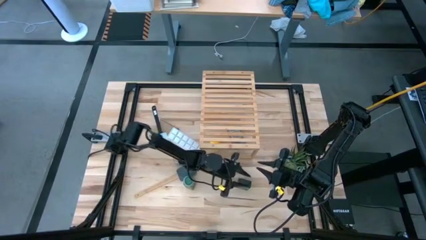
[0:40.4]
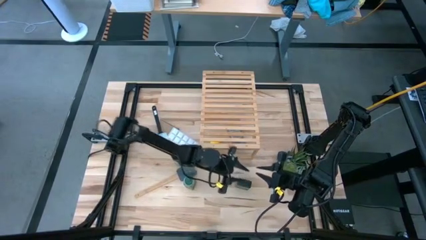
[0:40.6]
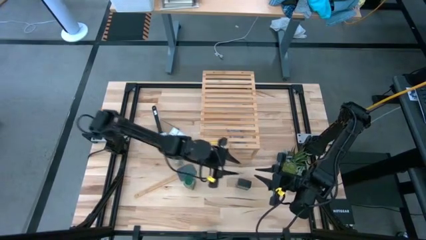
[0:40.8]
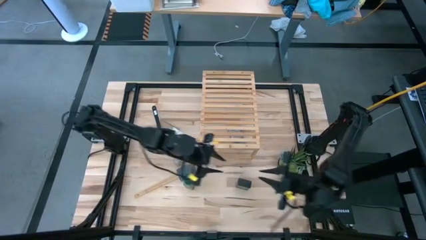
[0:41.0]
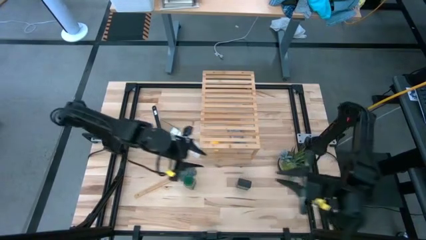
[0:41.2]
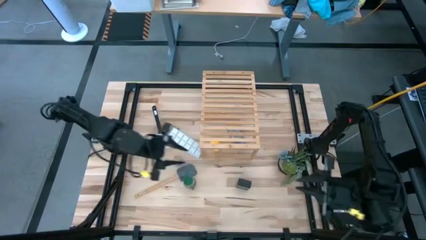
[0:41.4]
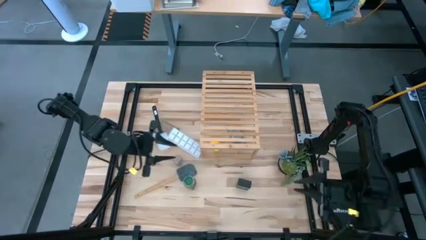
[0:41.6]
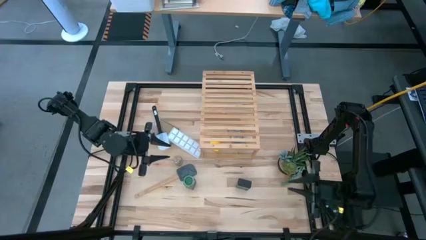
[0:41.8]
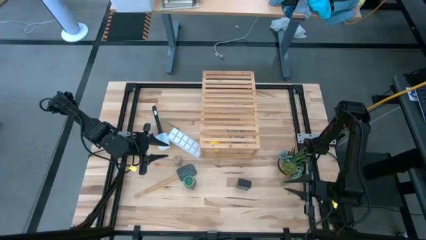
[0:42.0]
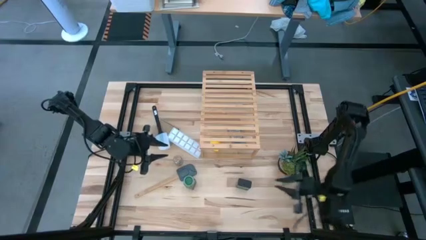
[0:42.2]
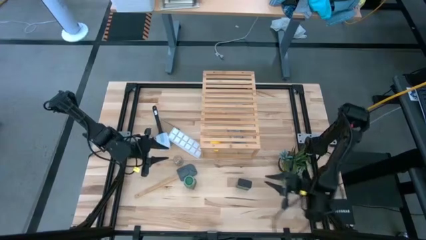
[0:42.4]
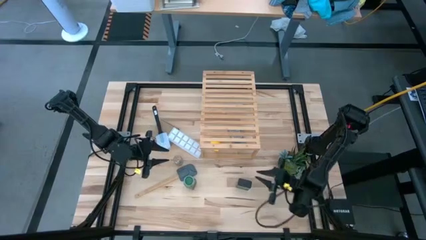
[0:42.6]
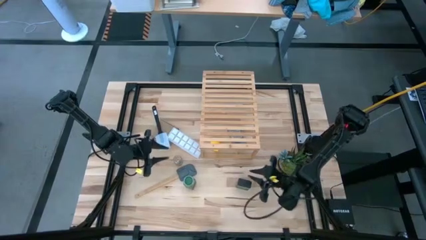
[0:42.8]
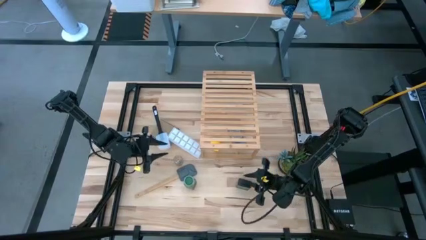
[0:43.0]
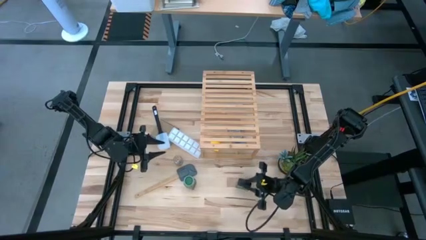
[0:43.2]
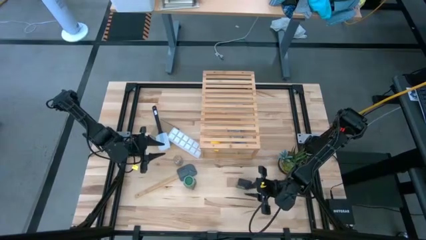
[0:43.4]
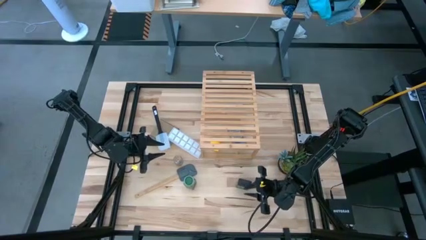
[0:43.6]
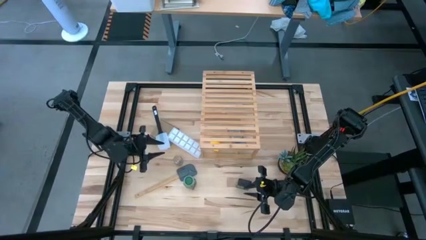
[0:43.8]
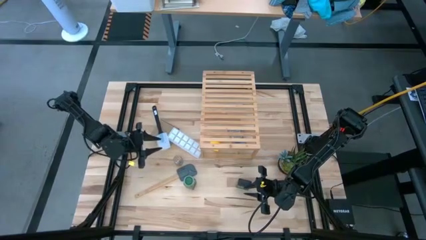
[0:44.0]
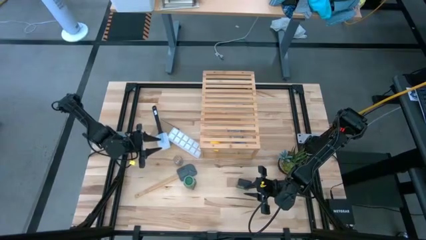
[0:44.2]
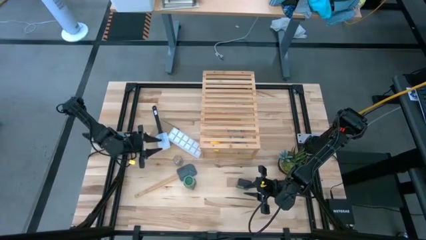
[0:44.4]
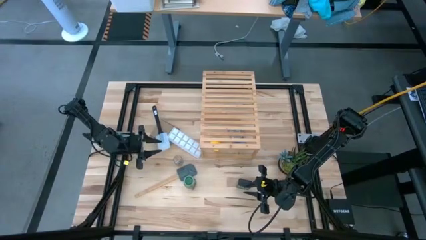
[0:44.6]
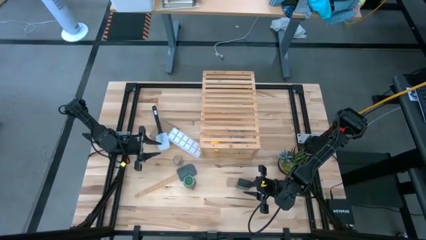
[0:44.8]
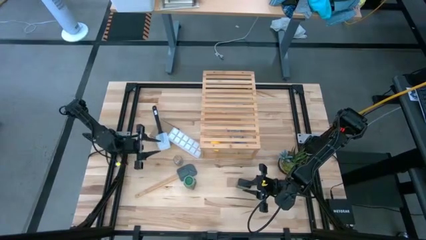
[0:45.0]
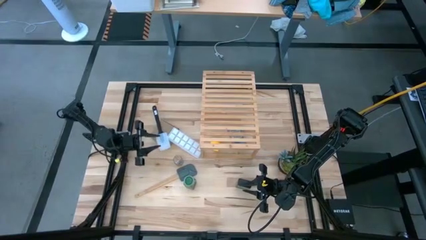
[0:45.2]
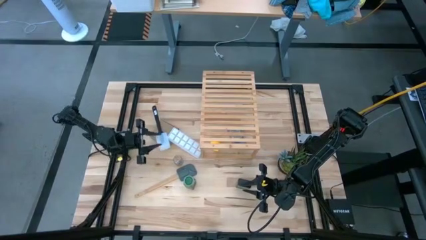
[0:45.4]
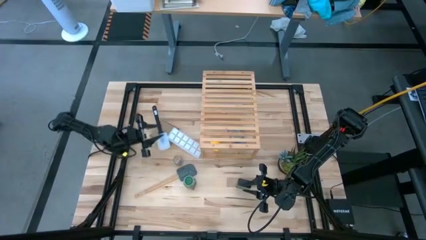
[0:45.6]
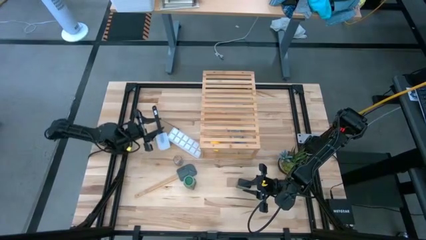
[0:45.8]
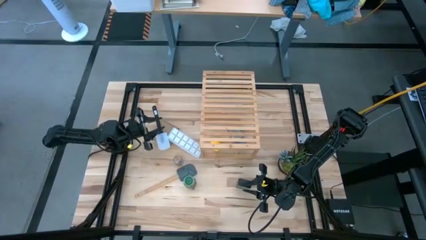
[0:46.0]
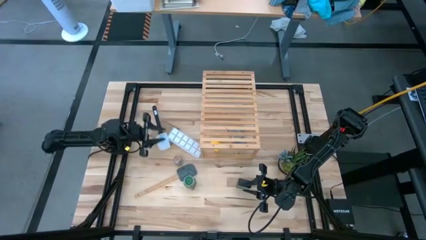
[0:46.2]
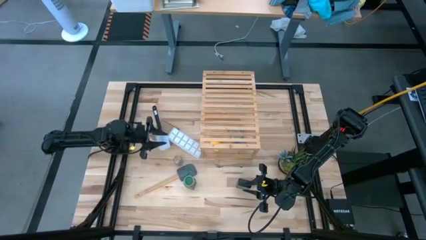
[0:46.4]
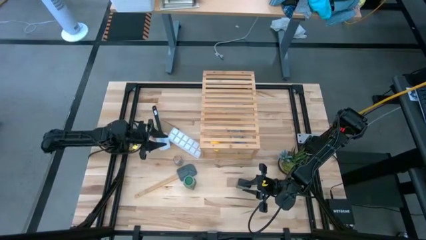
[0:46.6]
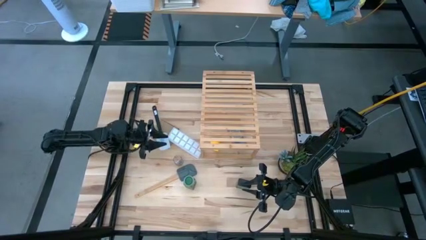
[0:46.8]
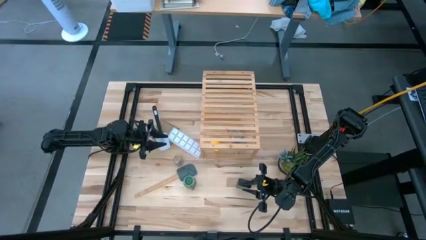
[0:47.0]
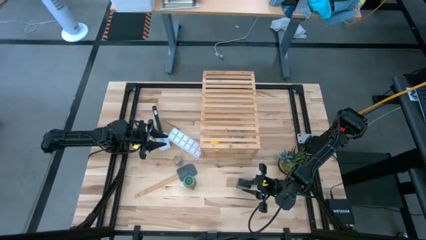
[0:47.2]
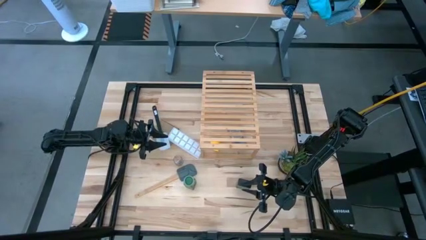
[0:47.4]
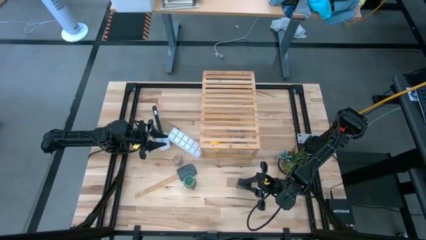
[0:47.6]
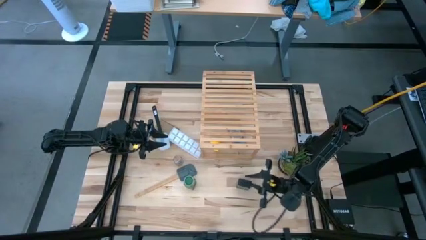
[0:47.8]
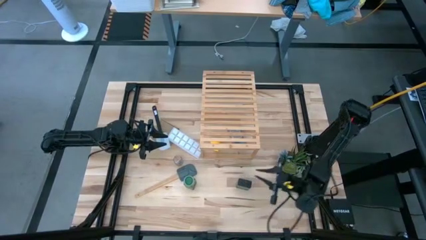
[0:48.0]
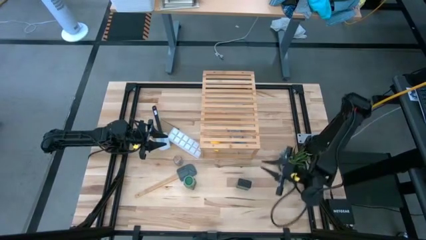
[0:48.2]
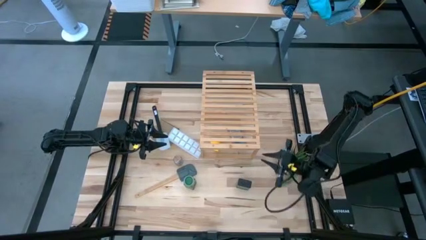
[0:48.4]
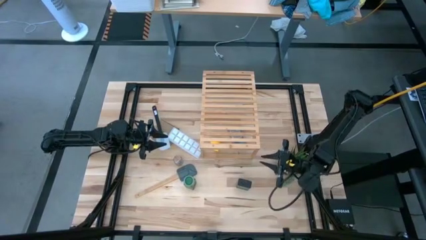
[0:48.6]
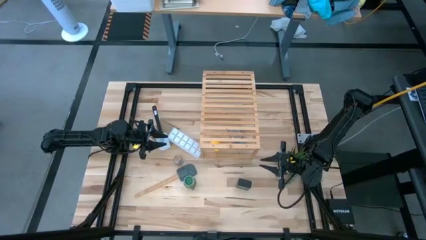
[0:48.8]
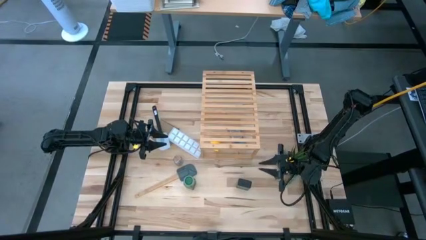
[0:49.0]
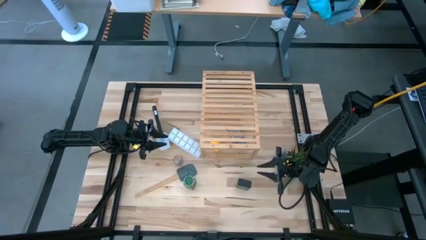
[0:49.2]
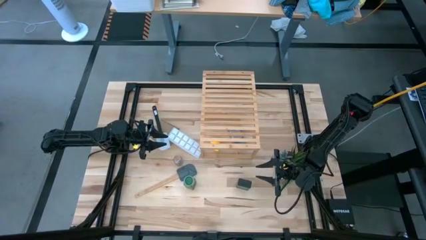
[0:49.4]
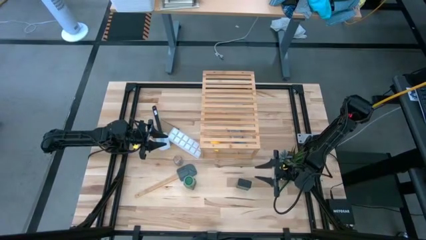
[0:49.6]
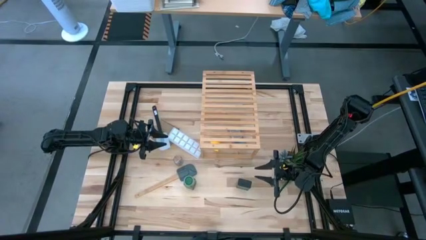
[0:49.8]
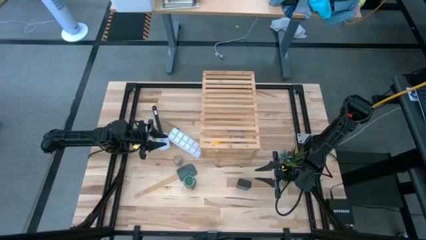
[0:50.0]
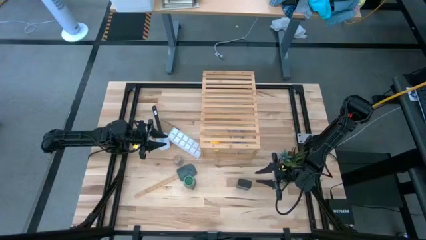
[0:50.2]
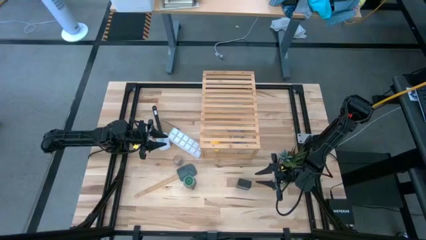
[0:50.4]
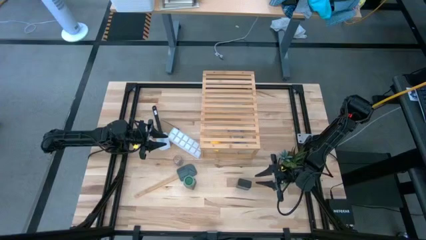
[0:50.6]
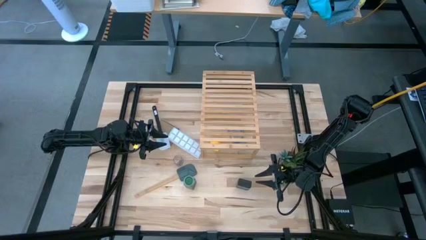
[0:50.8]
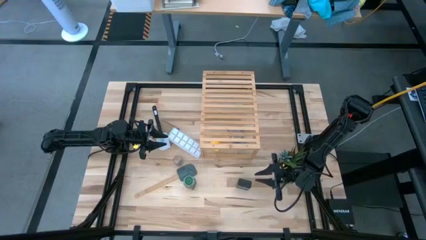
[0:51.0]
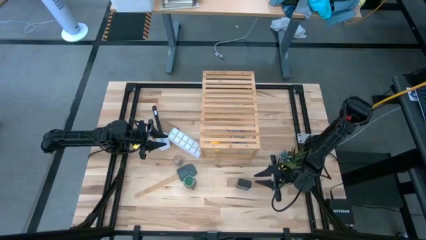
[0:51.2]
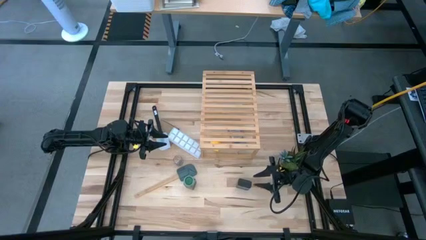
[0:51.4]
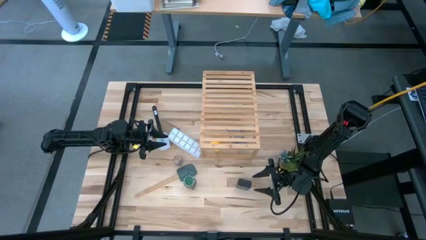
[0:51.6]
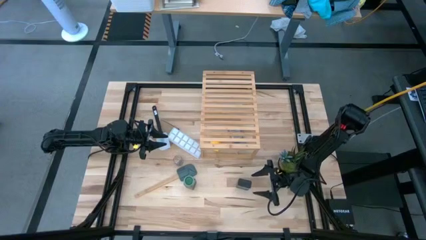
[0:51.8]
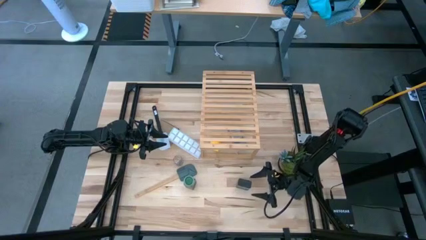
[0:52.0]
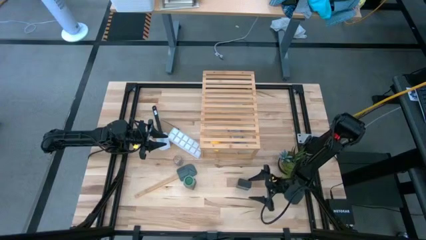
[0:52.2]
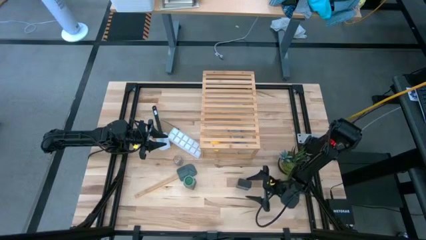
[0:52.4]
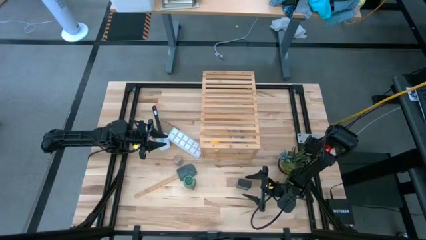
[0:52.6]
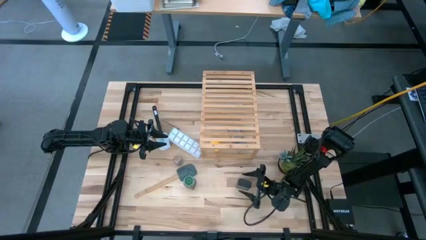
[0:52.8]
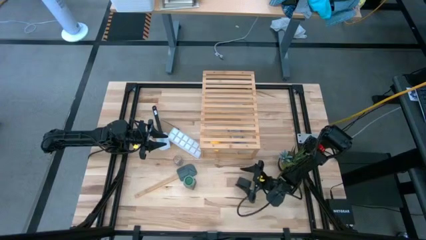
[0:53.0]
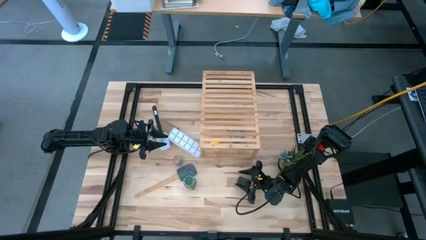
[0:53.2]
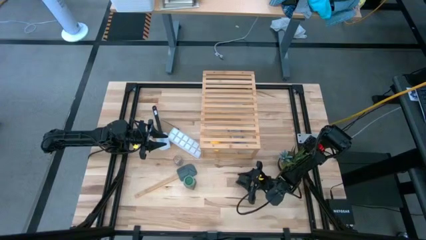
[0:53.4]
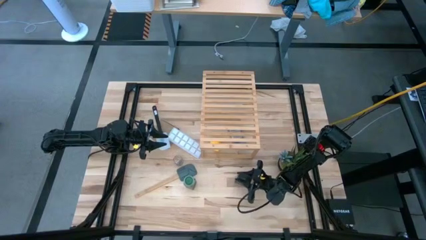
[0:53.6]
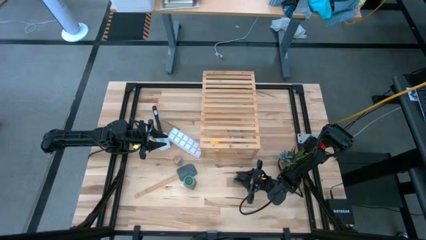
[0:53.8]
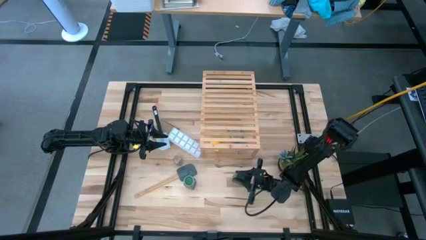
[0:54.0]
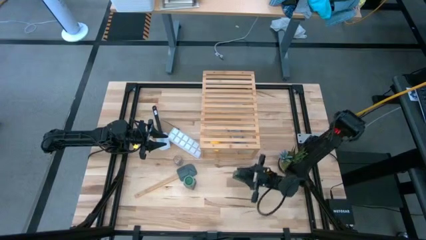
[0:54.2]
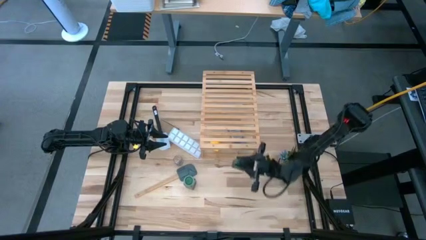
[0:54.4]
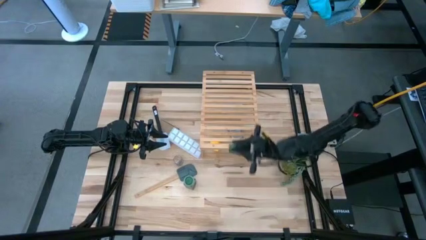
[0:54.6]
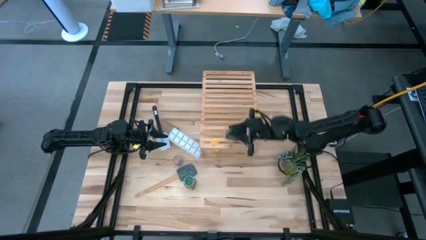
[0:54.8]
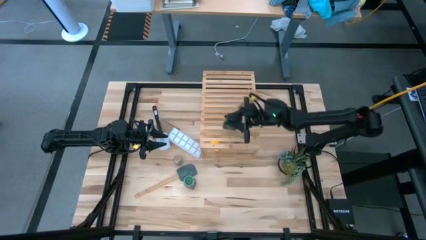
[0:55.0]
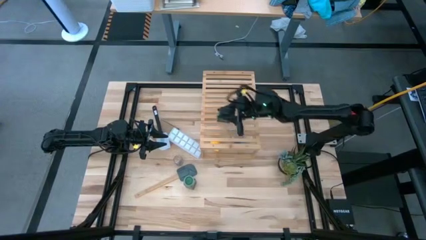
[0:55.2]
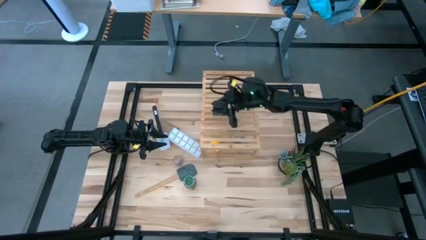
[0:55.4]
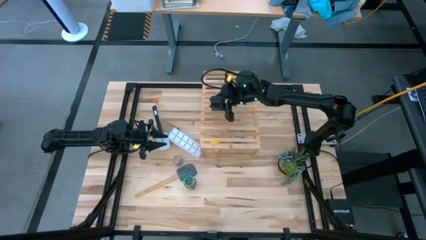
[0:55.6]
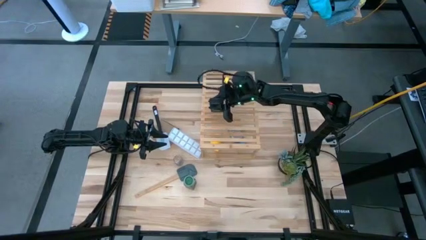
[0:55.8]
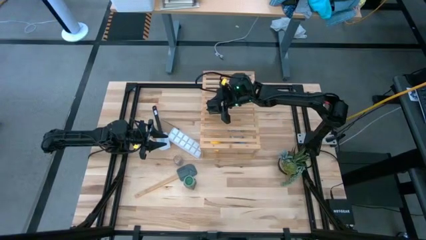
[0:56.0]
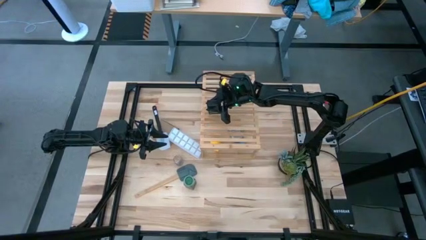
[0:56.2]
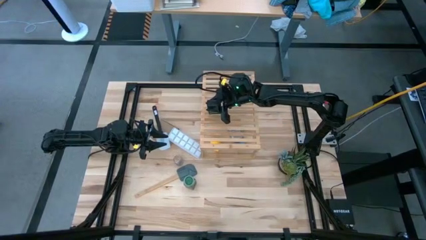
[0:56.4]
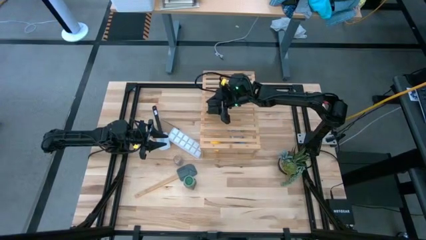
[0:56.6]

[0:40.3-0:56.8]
Task: Shelf spices
Put the black seasoning can on the shelf
